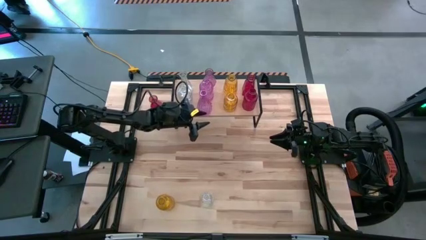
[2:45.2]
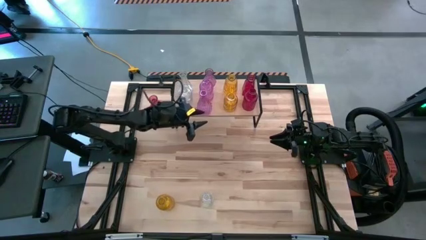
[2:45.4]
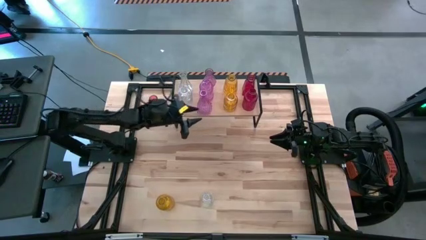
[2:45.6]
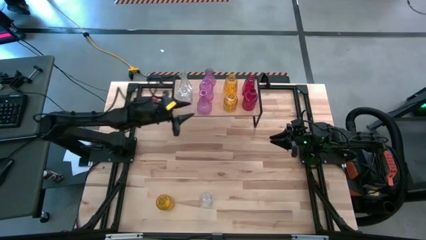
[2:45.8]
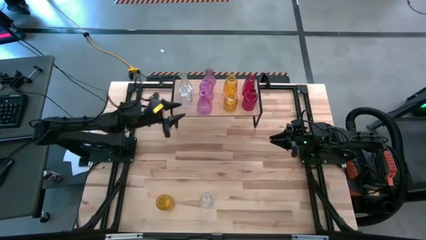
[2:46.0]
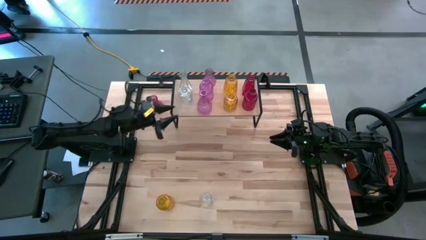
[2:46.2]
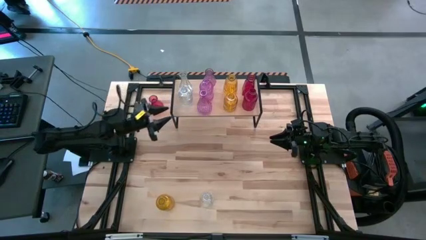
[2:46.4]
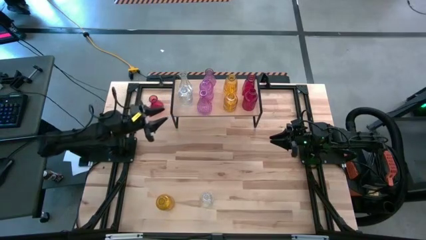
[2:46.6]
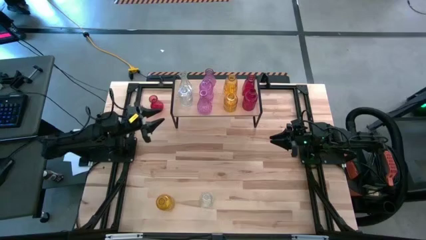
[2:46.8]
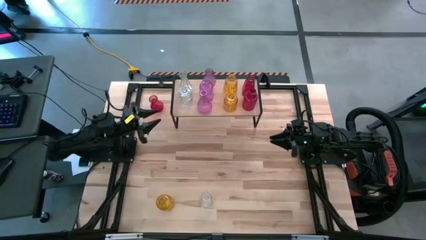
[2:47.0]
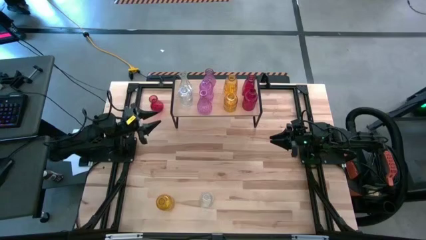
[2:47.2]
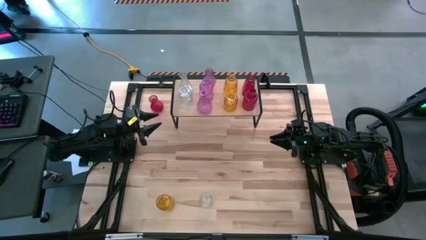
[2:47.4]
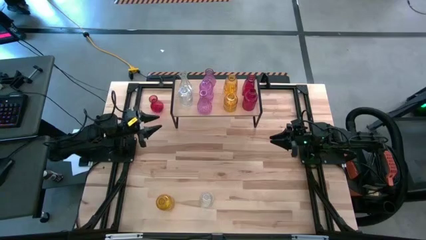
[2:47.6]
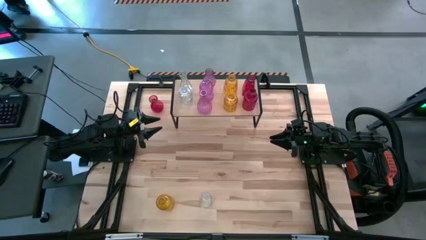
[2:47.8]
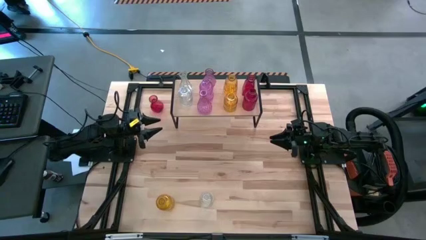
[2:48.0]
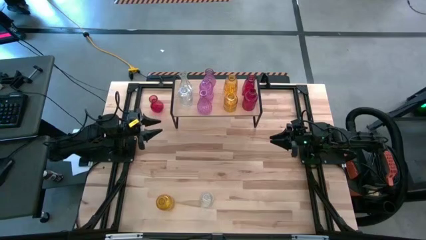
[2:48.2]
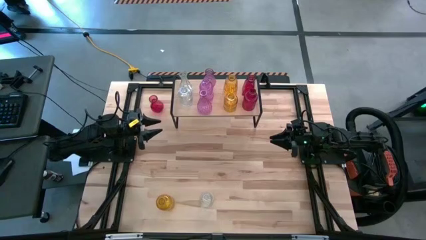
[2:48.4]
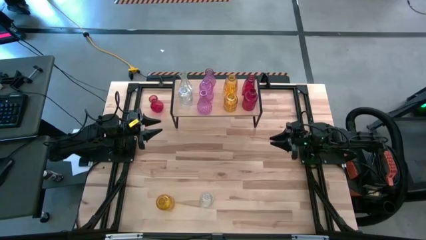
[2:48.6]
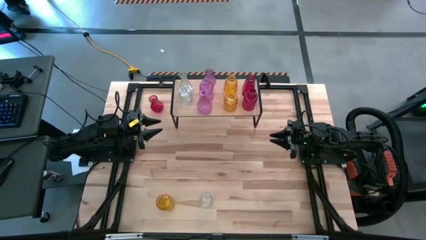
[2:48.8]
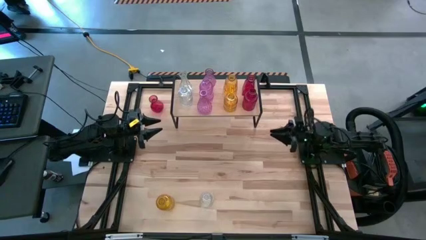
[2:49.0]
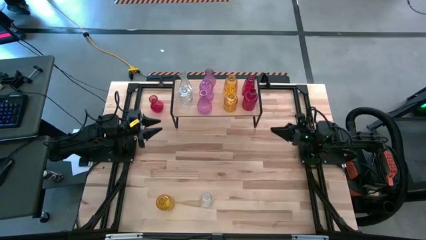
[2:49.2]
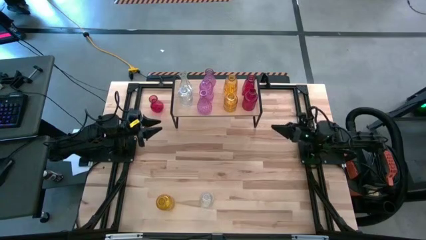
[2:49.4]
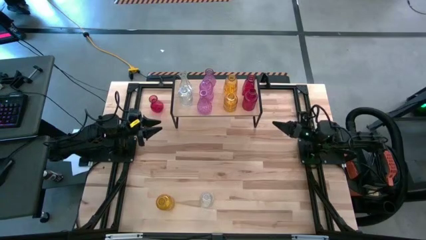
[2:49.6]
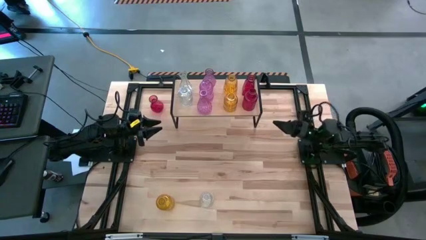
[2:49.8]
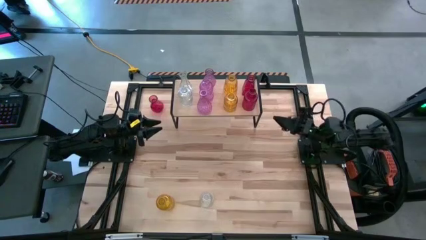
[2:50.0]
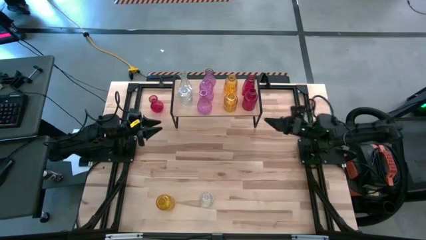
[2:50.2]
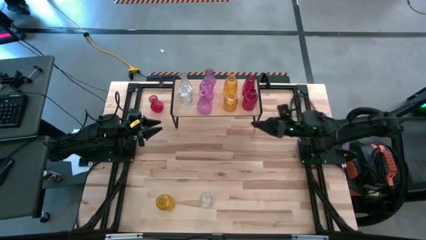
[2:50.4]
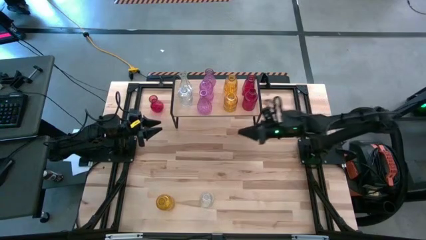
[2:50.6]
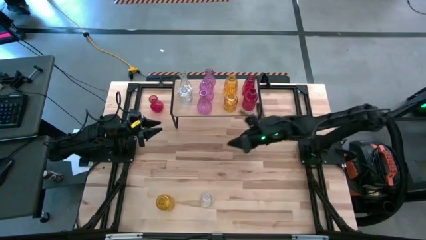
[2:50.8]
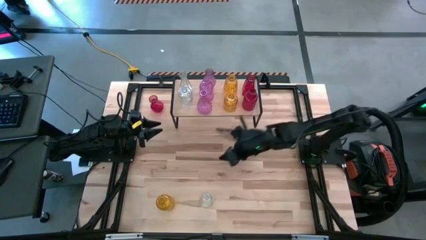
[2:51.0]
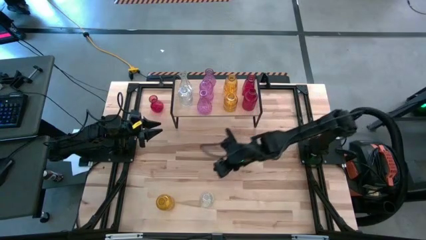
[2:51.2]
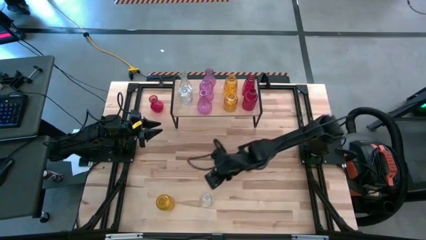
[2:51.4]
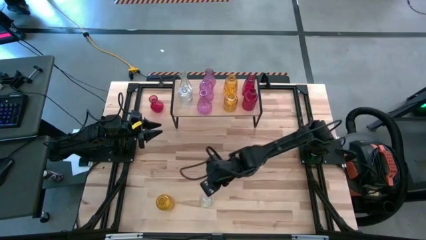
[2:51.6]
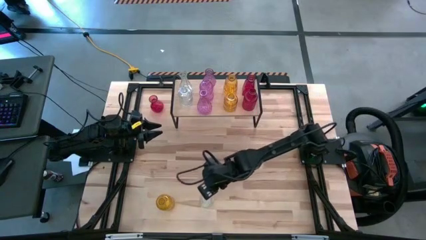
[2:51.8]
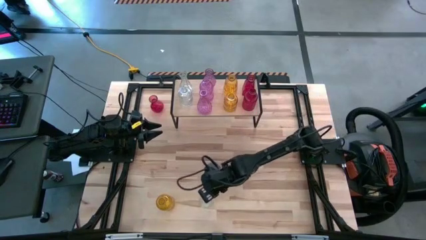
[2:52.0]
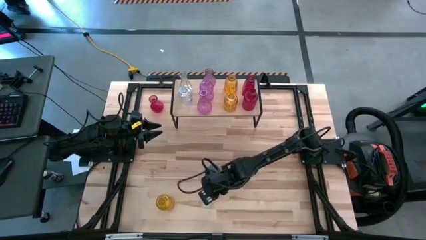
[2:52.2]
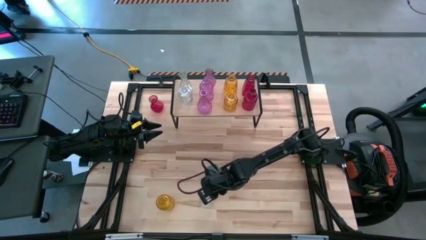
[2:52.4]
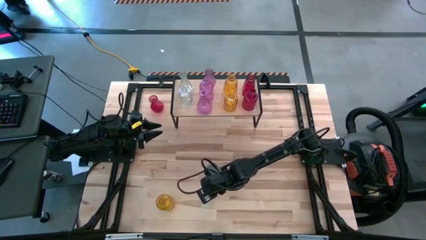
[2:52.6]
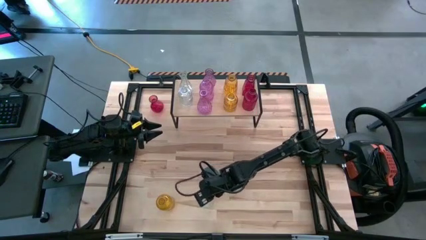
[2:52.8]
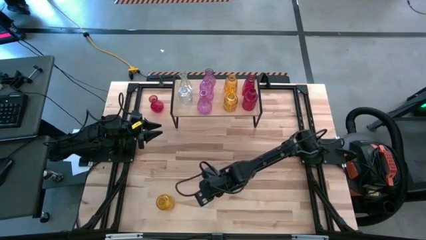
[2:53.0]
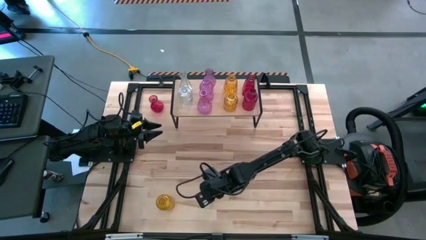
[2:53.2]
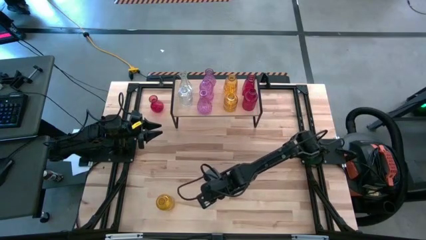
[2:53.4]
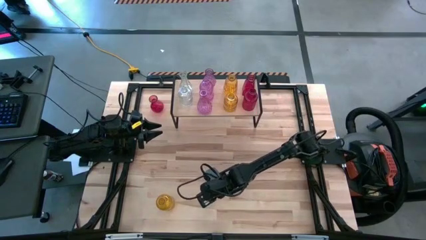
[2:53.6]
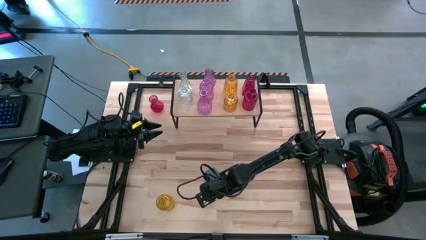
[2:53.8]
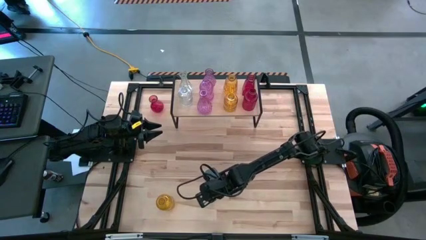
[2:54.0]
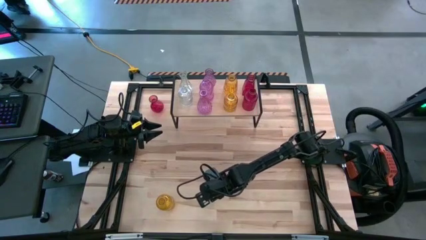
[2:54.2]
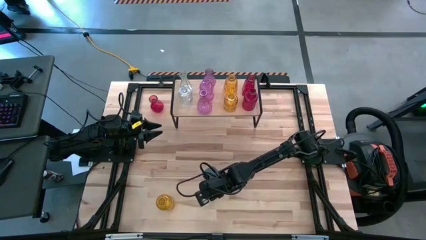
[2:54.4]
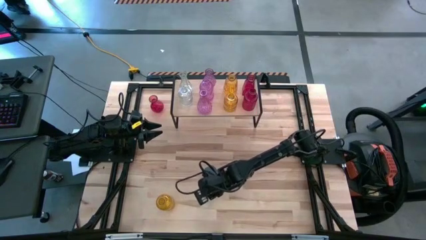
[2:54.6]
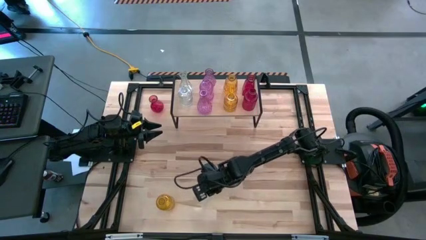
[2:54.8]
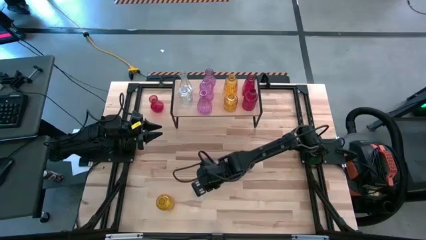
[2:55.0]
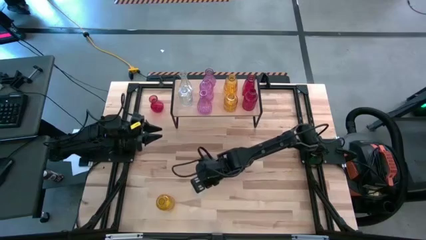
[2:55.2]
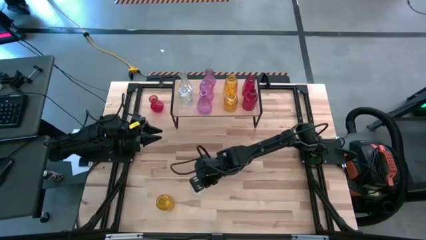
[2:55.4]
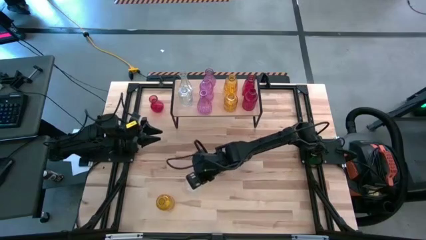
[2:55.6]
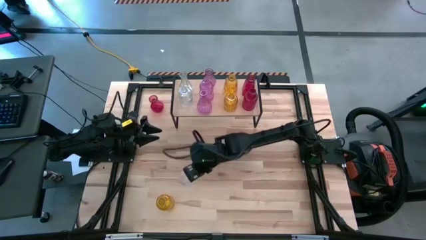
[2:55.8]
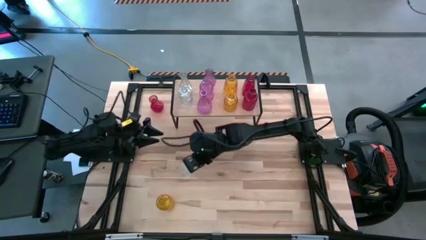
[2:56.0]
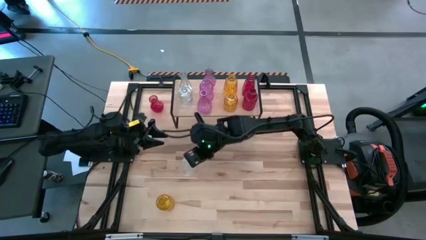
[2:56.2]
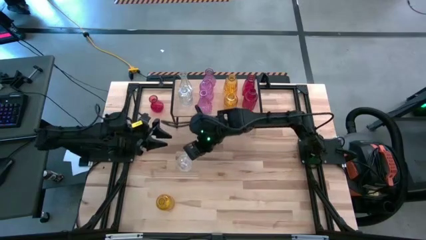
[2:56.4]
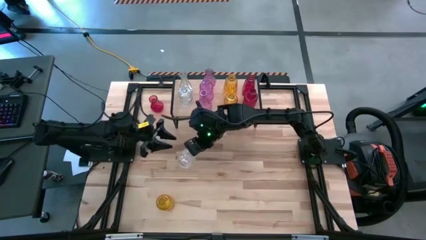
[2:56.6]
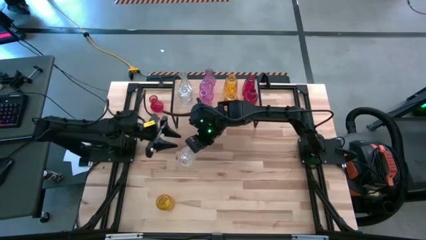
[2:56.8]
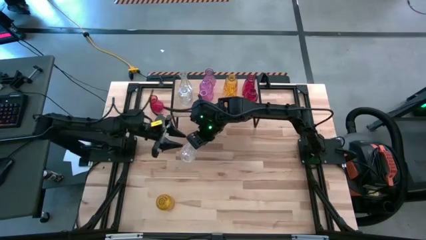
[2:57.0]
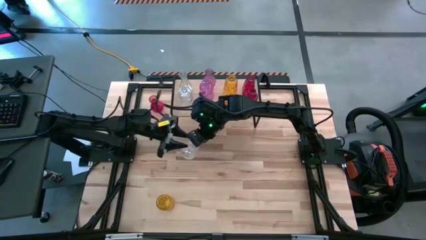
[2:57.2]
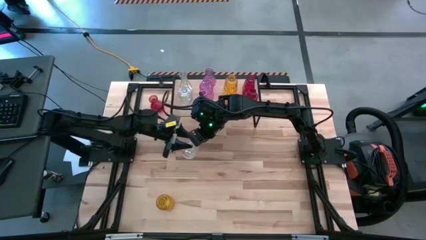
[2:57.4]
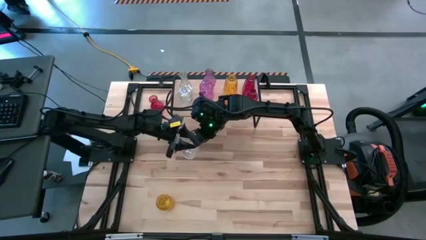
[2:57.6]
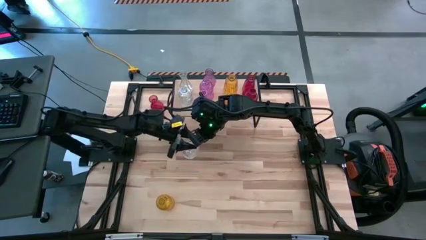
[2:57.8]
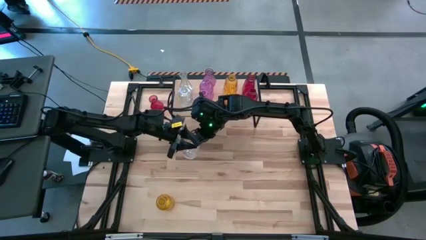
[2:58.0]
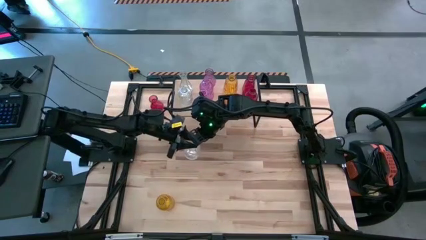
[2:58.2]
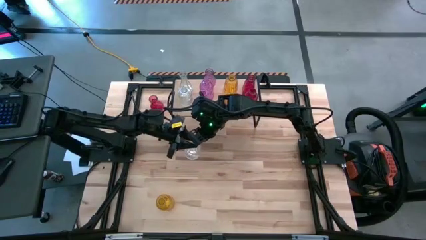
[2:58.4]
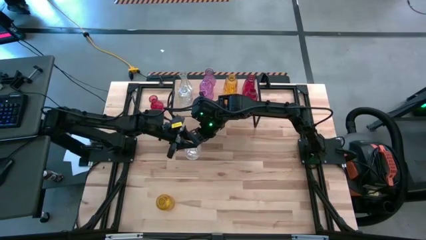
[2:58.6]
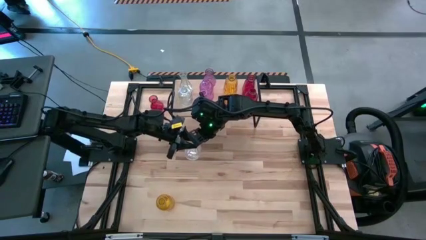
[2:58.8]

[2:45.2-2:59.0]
Task: sort vases onto shelf
Put the transparent vase on the shelf aligned with the other transparent vase

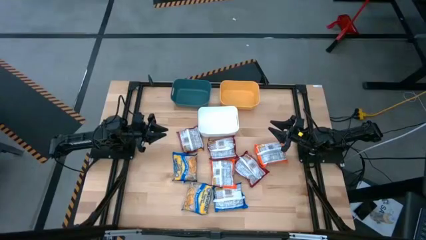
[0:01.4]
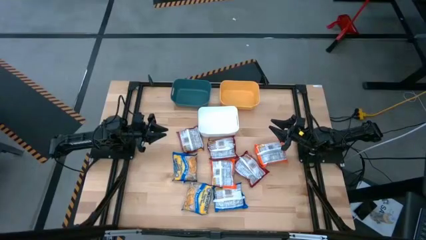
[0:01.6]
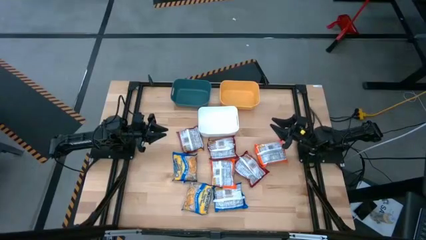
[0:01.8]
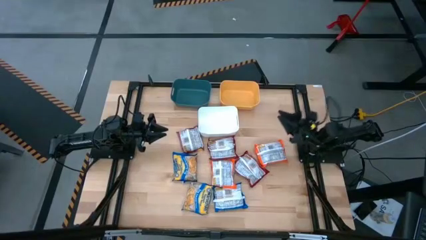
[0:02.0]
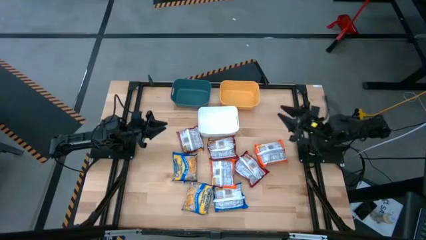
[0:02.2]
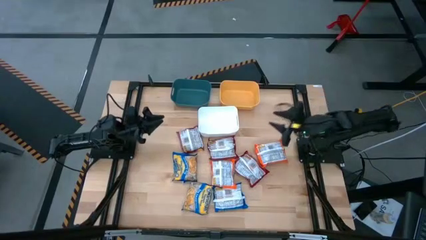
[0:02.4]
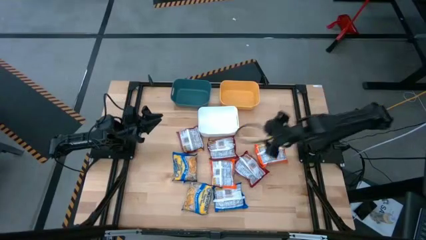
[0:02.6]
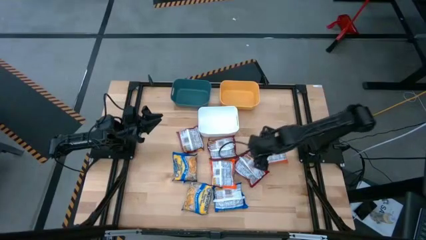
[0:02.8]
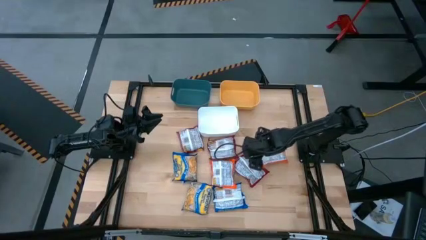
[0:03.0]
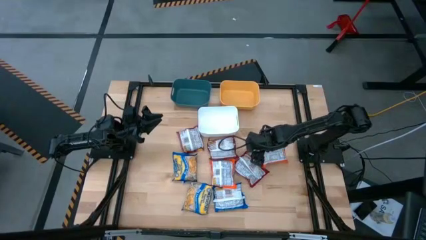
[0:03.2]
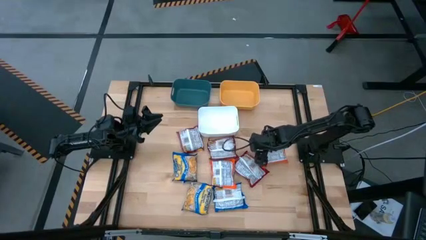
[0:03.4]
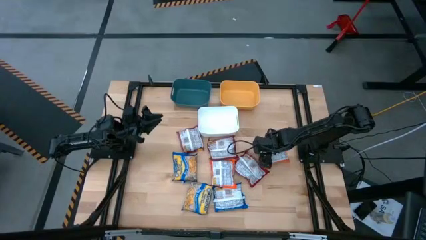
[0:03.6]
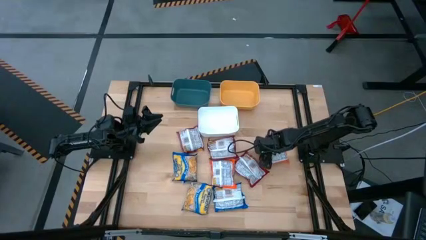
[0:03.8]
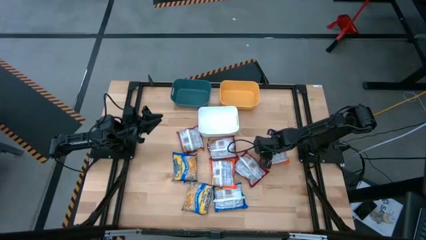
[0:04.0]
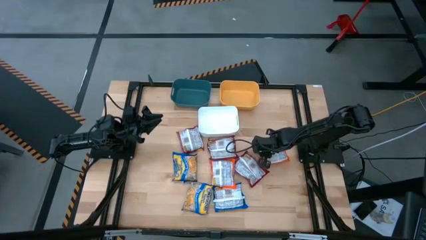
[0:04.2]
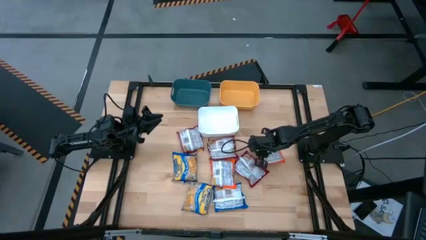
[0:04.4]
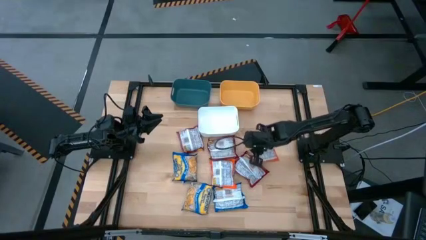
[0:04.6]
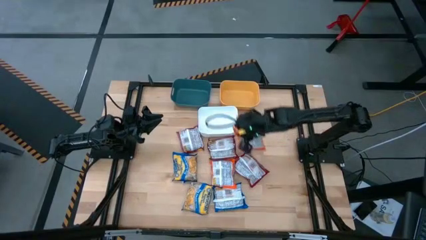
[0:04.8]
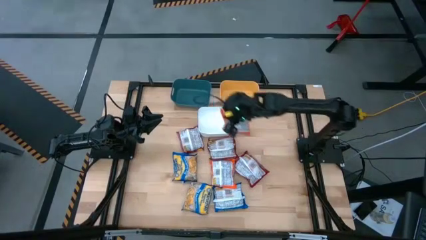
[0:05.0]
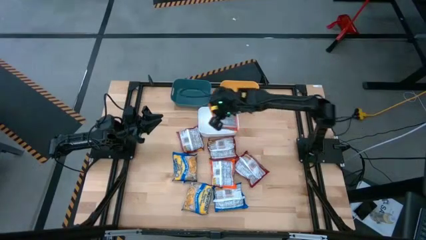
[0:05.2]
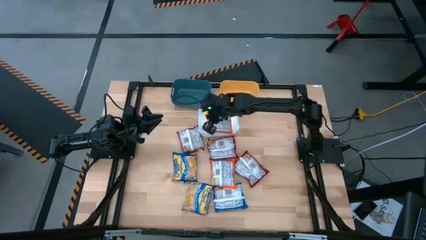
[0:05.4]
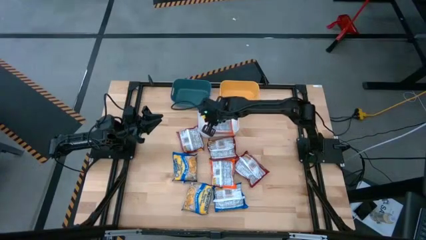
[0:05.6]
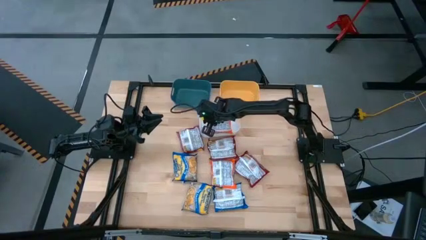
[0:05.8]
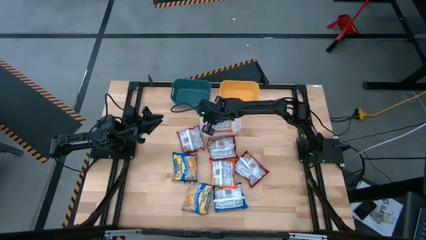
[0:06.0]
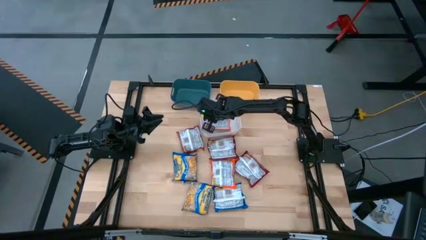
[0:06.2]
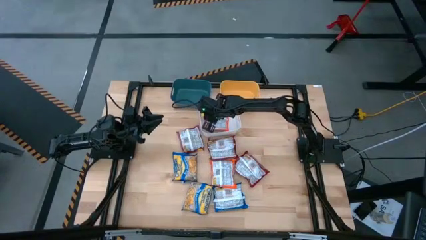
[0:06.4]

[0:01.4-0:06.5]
Task: Sort Maruchan noodles
Put the right orange noodle pack into the white bin
